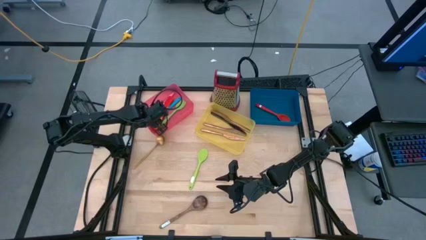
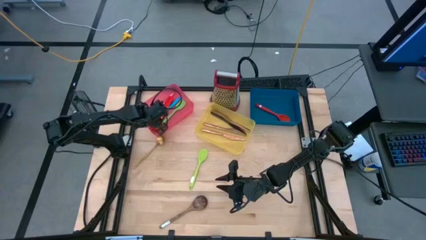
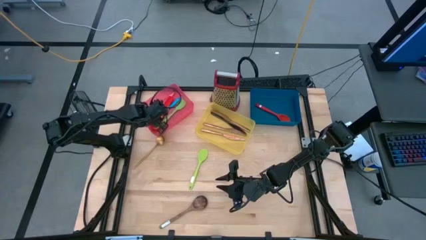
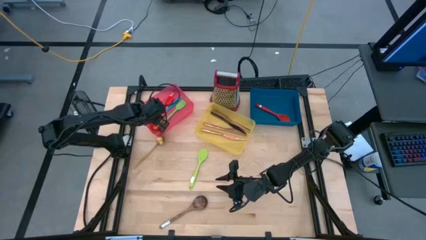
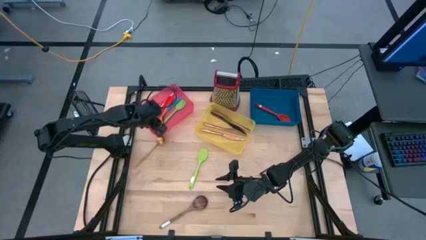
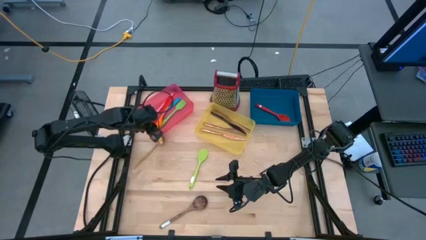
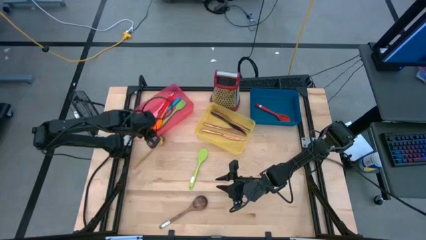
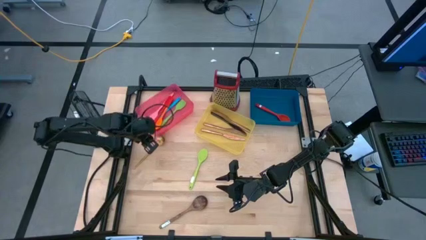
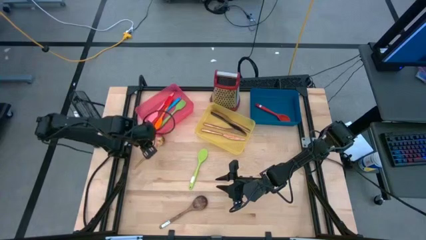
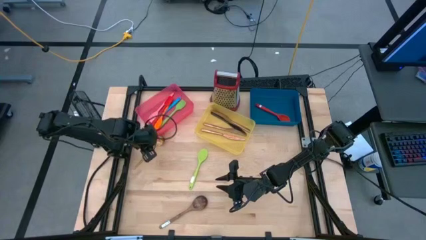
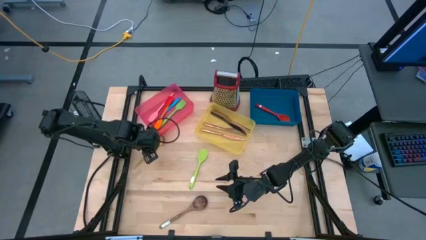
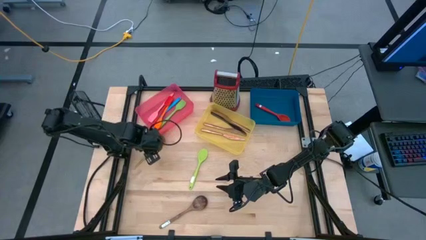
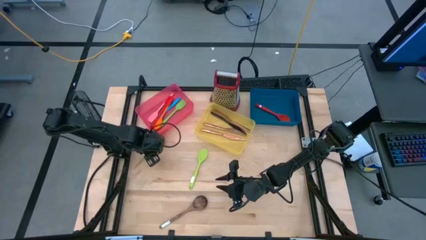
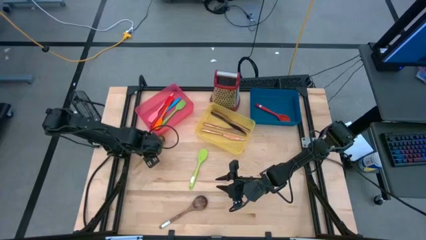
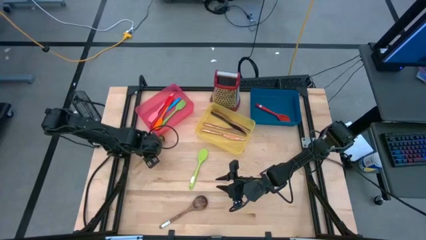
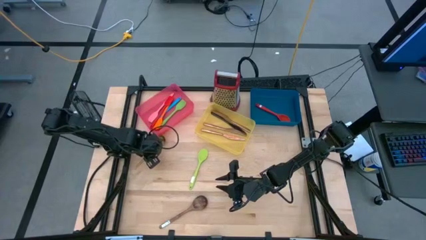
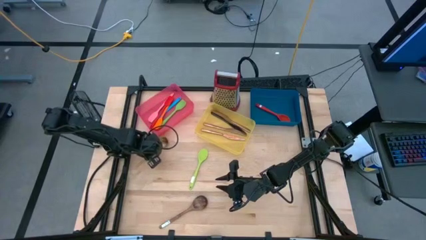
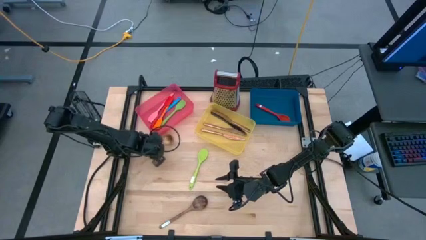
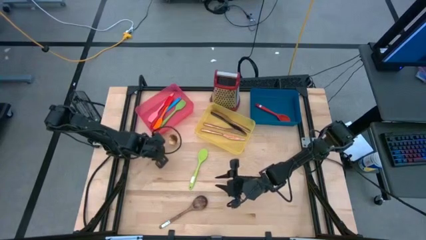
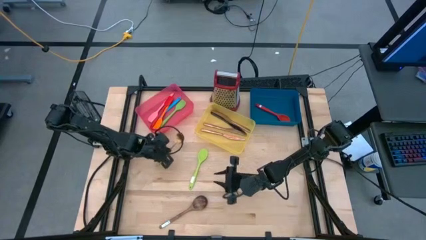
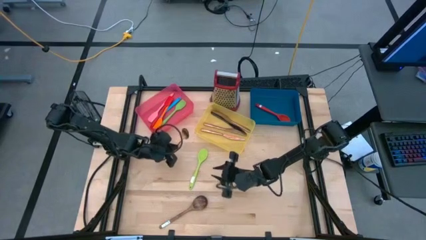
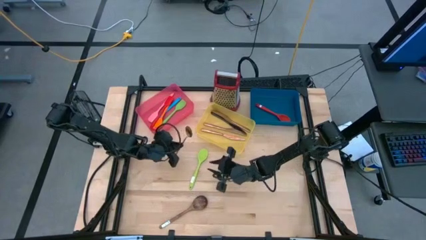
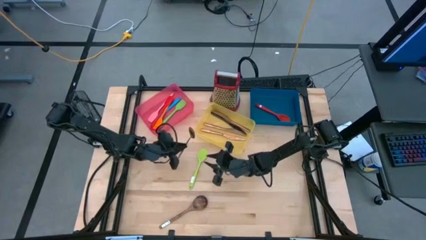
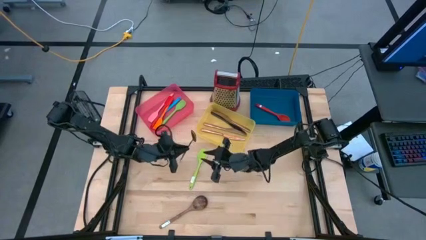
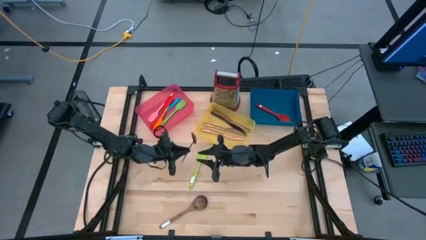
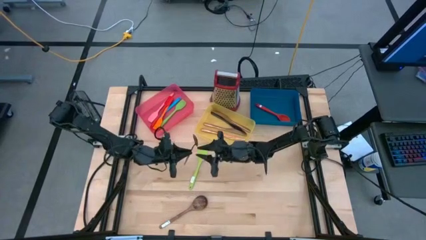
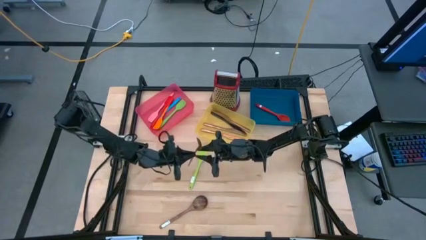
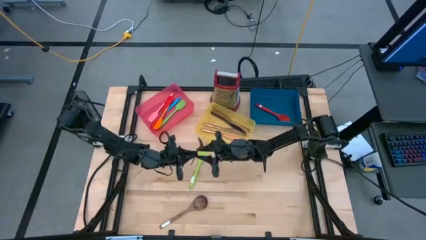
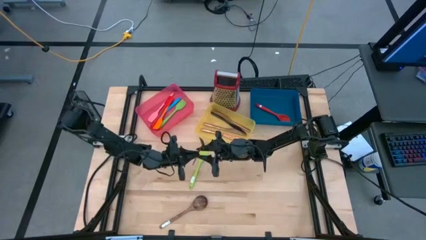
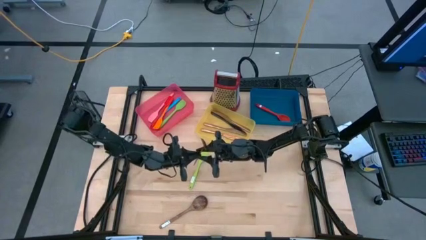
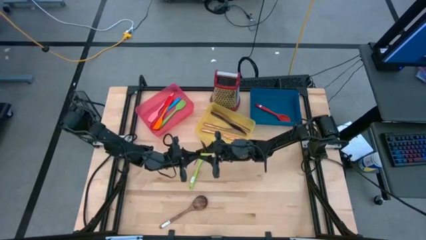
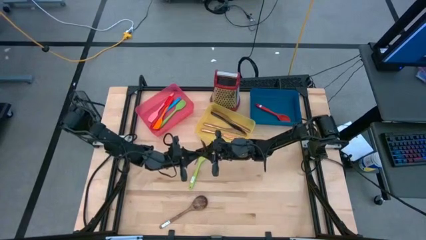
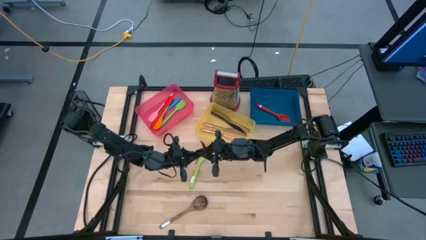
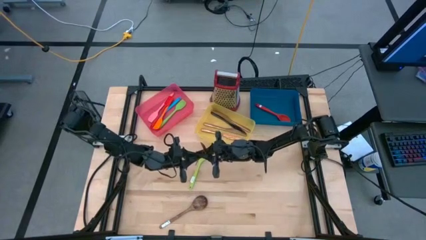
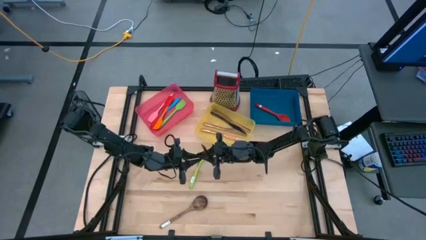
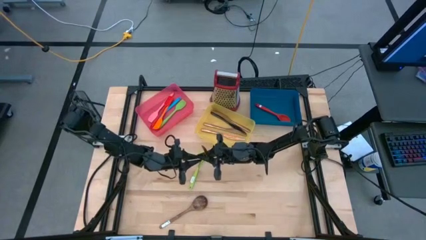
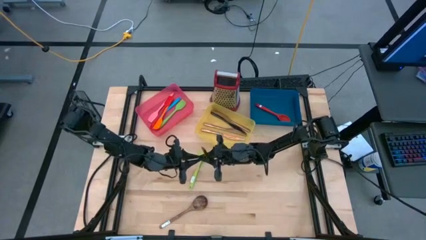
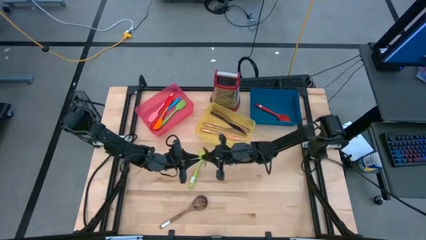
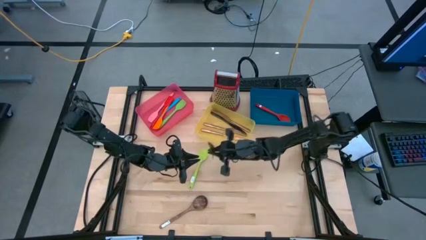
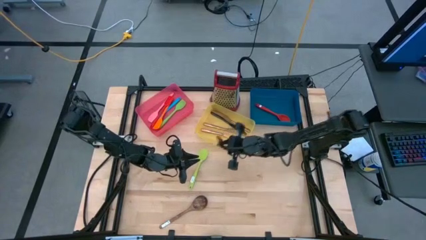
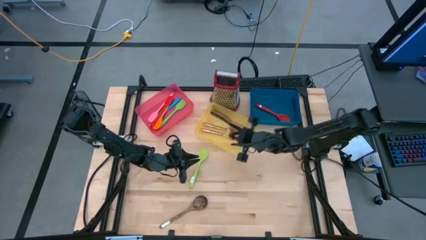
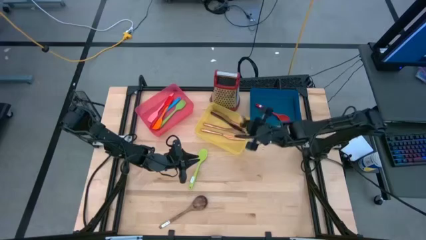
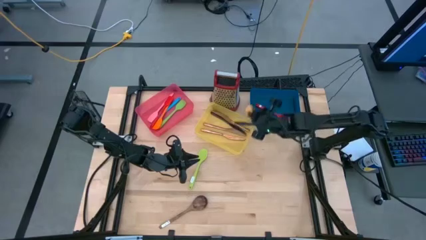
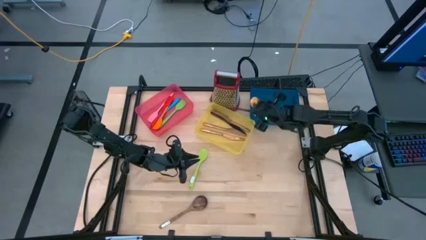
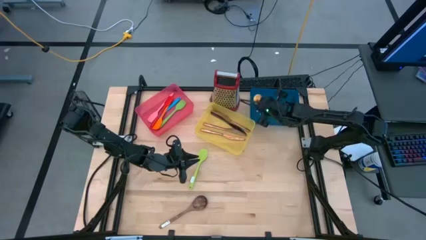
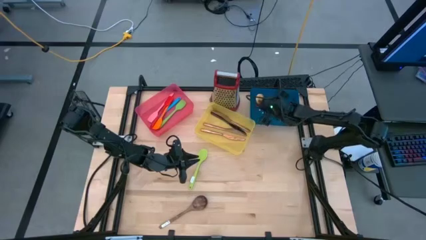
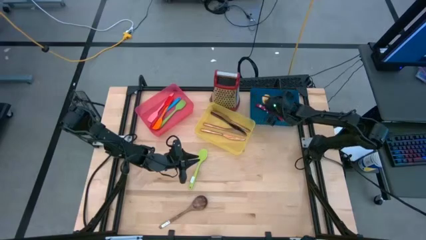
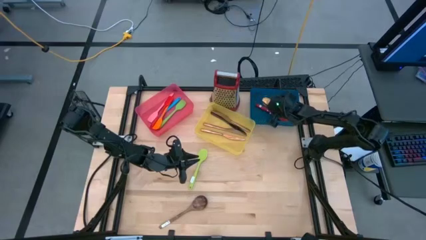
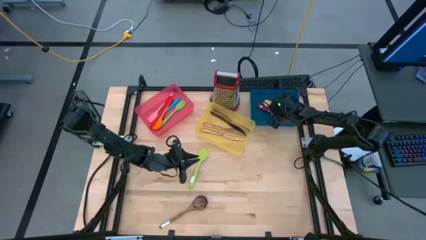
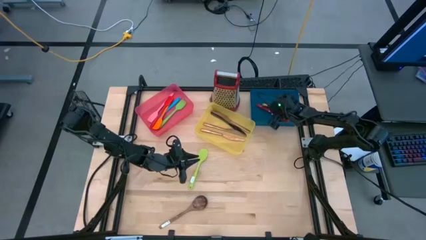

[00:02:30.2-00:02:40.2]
Task: Pick & Place Kitchen Items
Put the gold serving spoon into the blue bin

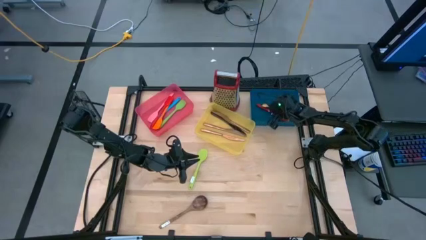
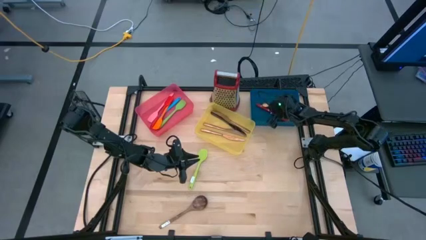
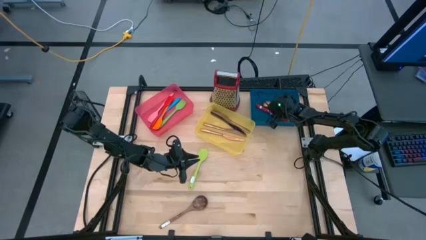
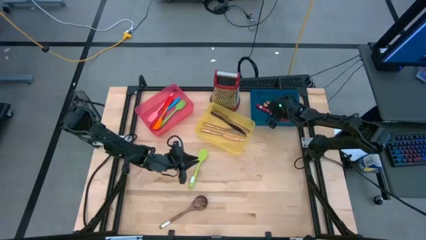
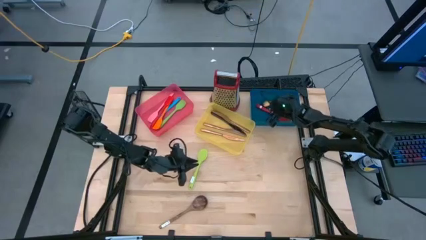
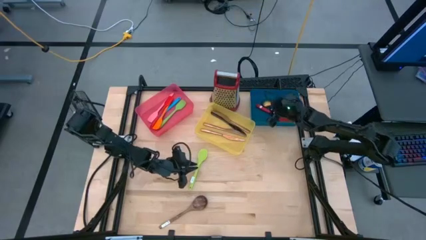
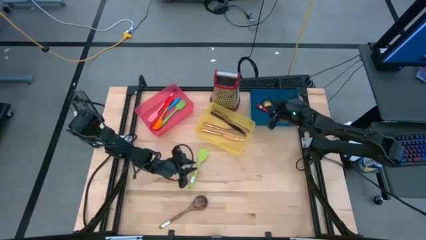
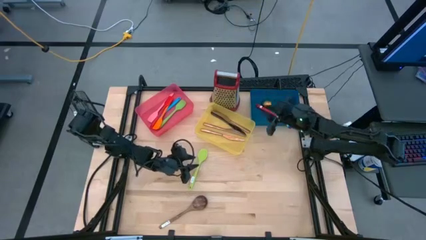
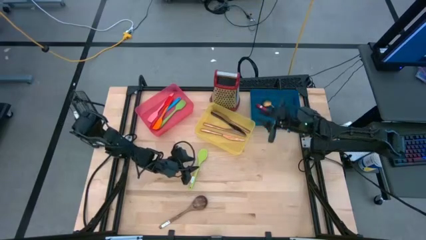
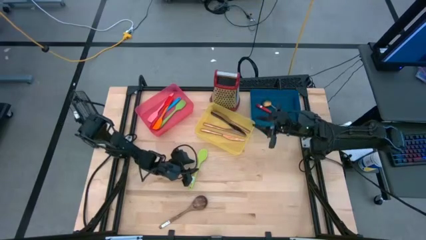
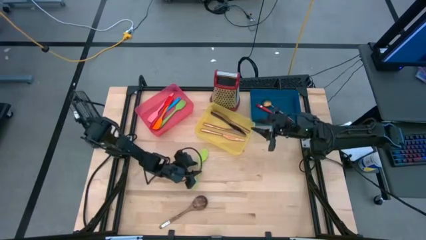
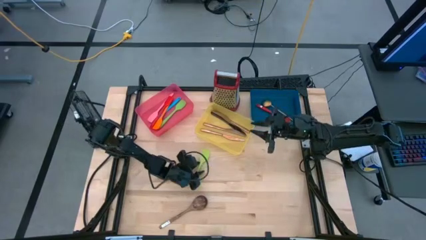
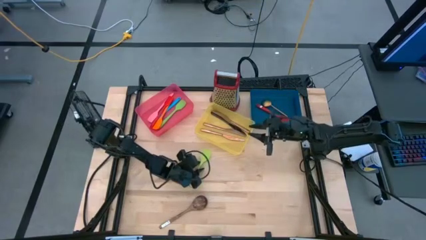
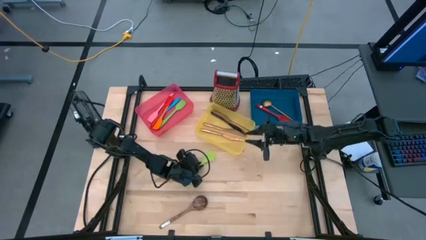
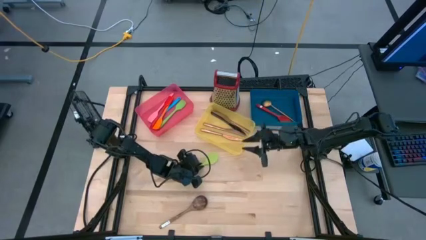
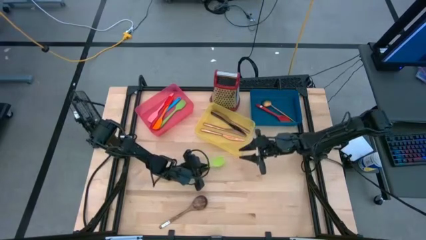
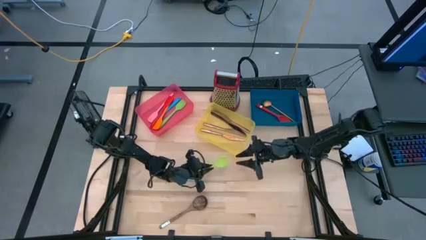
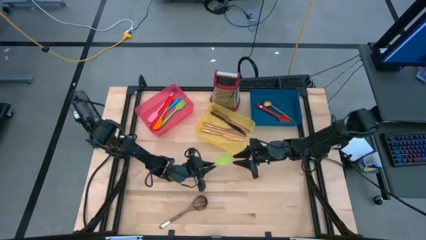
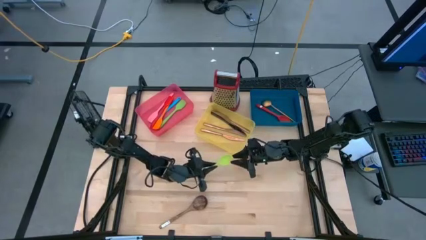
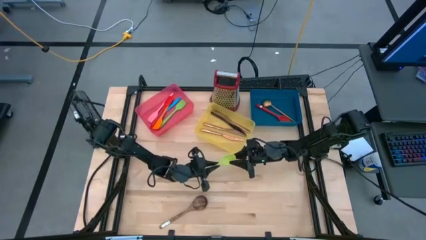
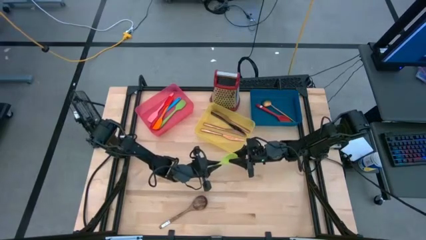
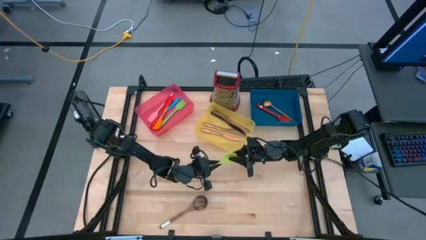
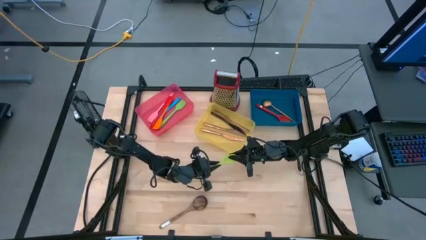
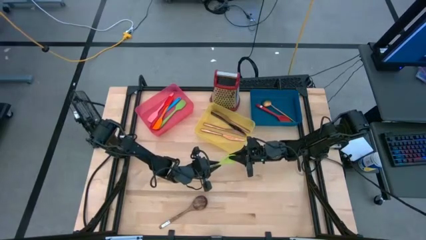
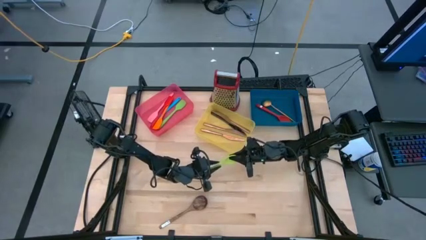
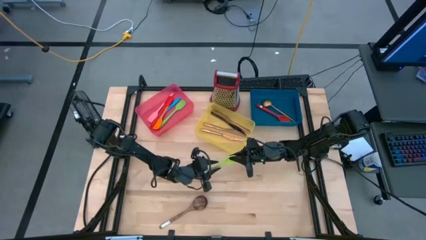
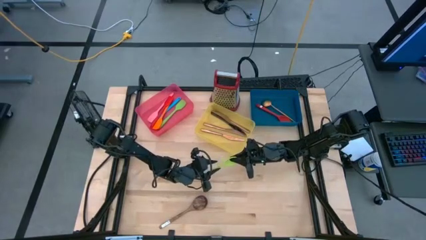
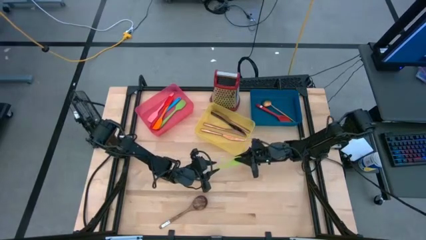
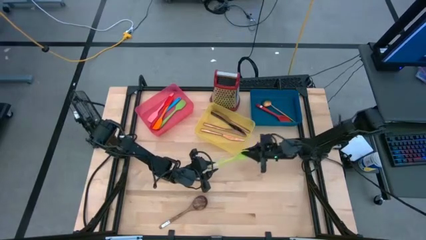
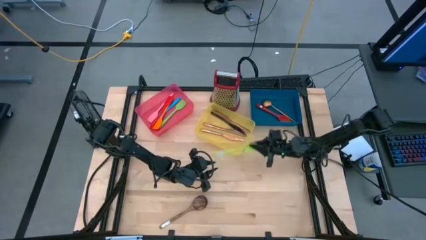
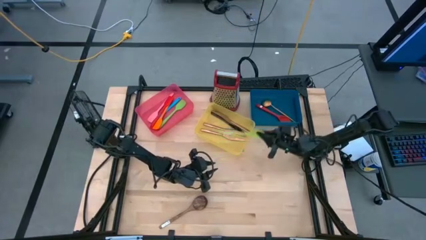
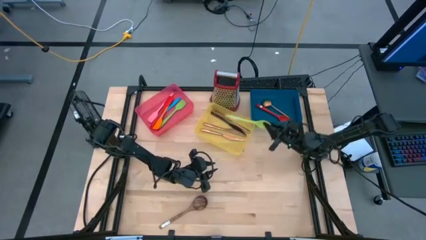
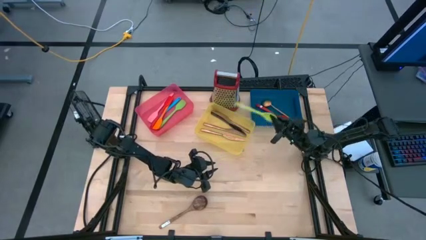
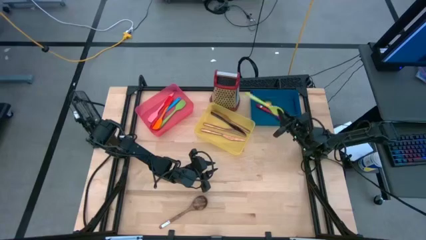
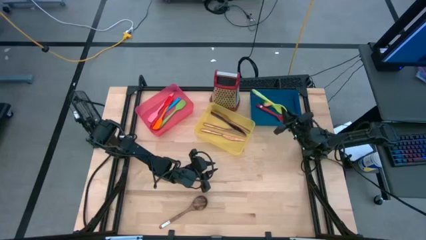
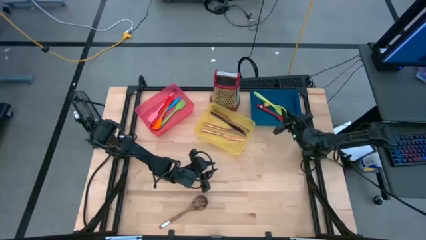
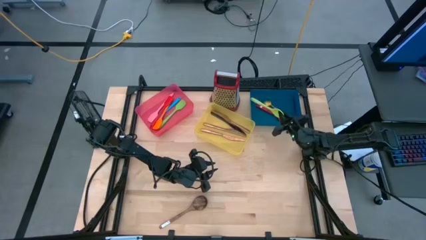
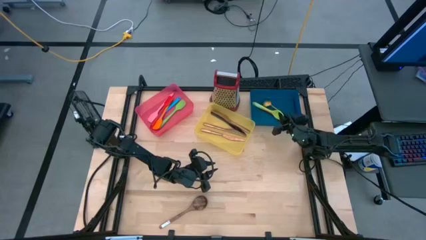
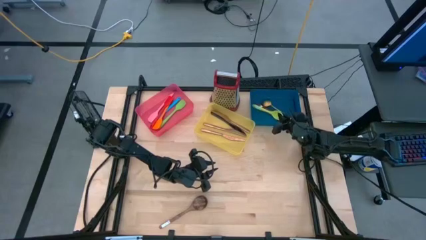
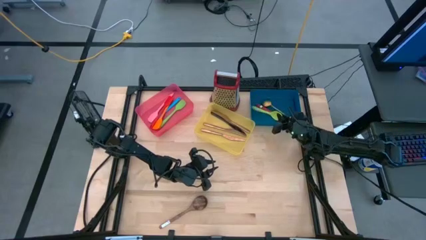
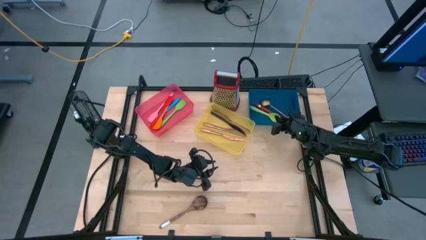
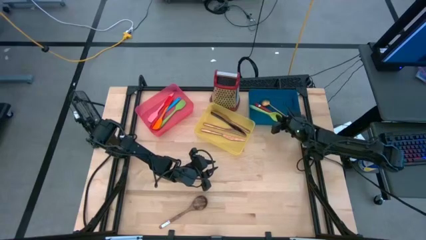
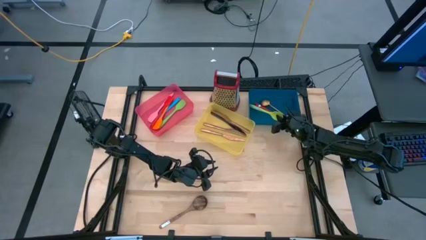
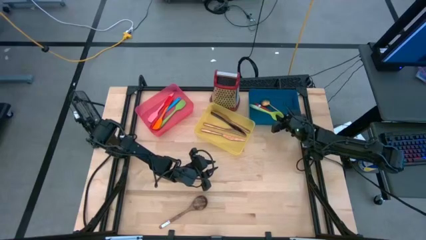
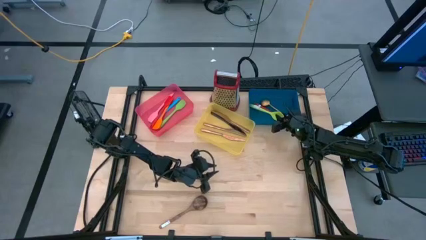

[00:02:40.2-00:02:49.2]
Put the green serving spoon into the blue bin
